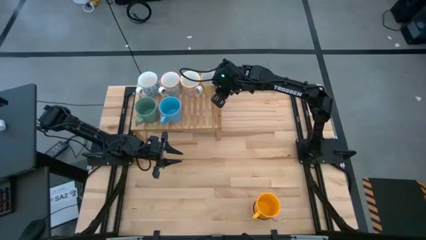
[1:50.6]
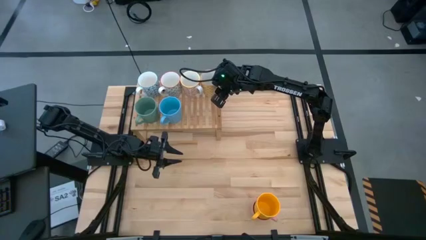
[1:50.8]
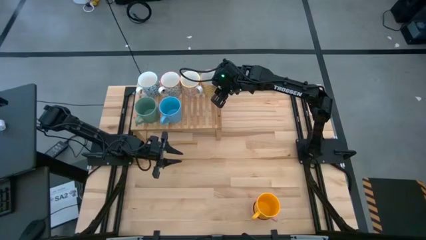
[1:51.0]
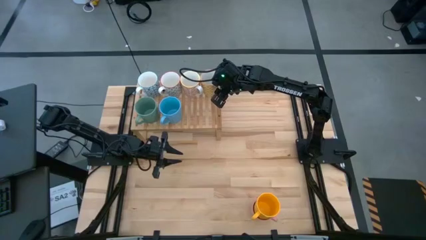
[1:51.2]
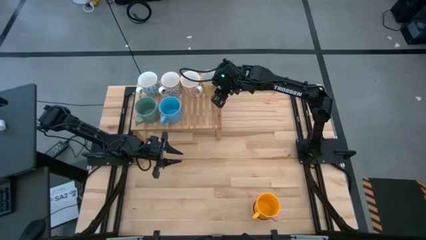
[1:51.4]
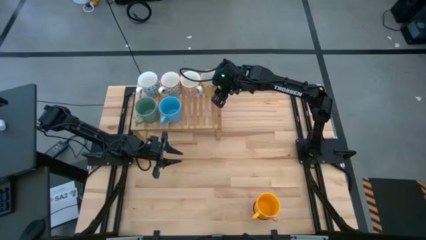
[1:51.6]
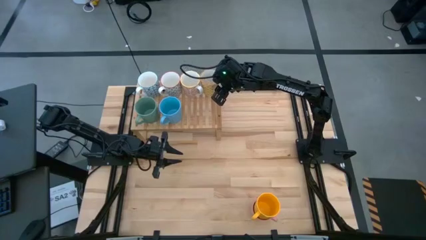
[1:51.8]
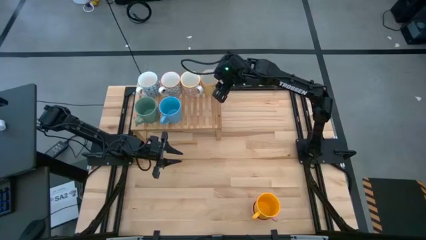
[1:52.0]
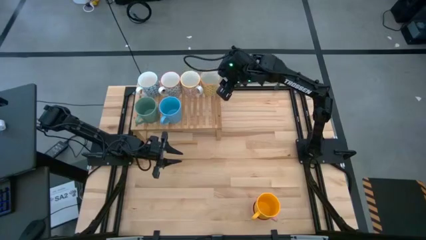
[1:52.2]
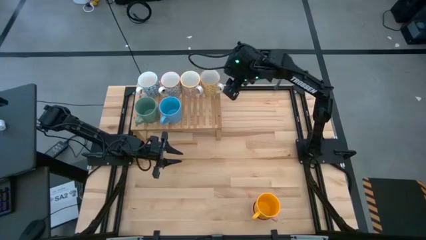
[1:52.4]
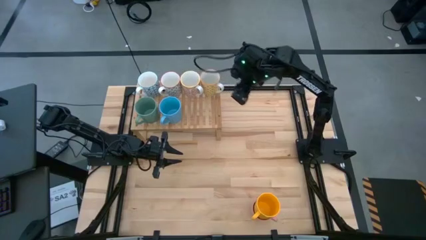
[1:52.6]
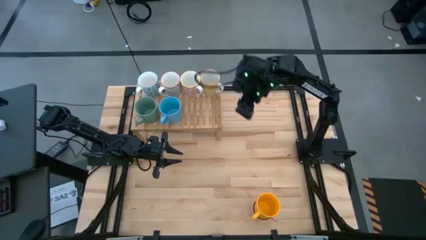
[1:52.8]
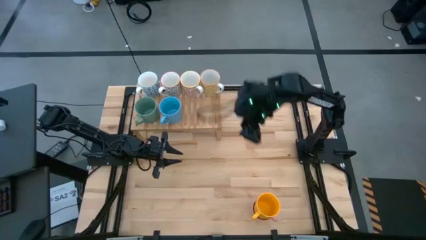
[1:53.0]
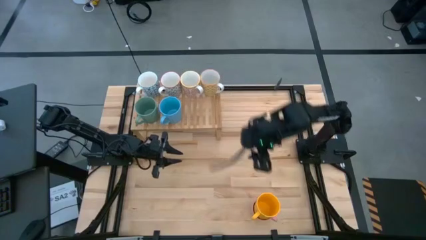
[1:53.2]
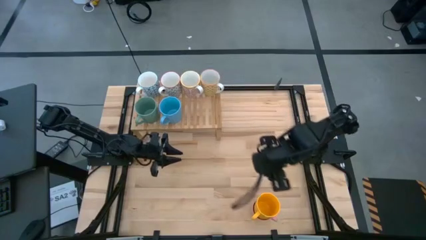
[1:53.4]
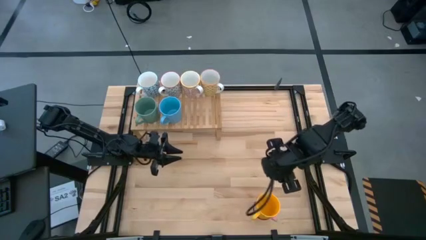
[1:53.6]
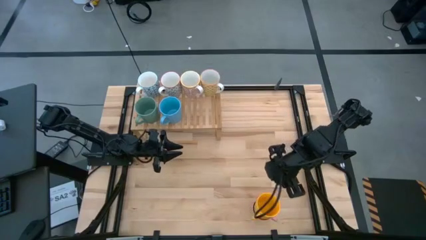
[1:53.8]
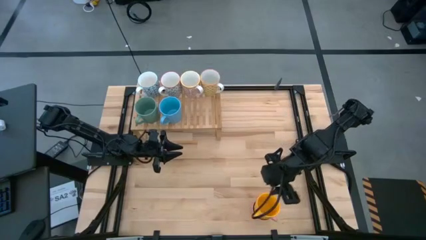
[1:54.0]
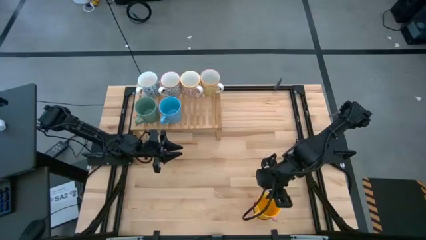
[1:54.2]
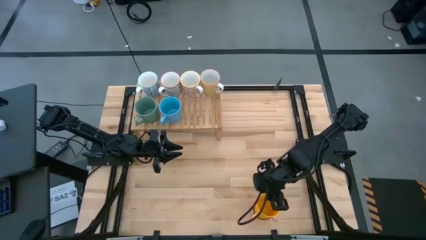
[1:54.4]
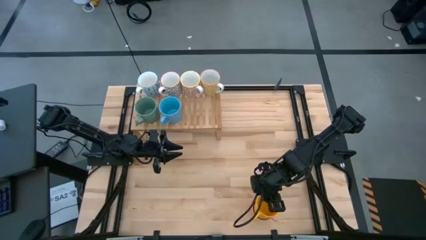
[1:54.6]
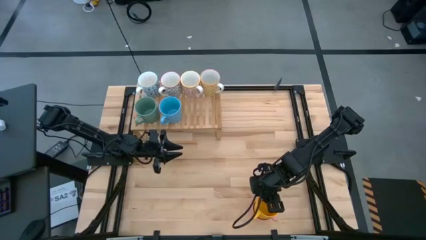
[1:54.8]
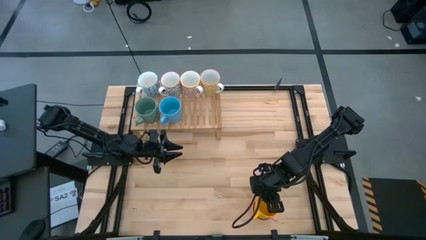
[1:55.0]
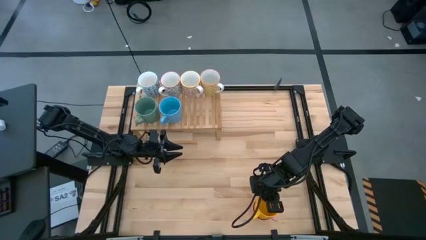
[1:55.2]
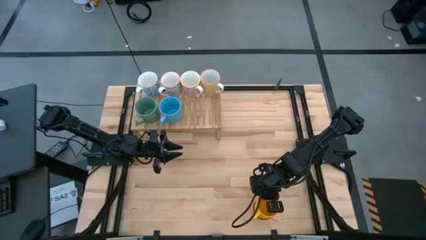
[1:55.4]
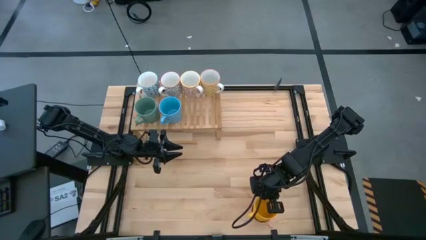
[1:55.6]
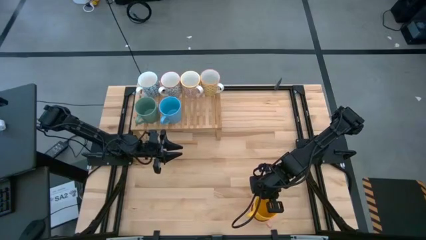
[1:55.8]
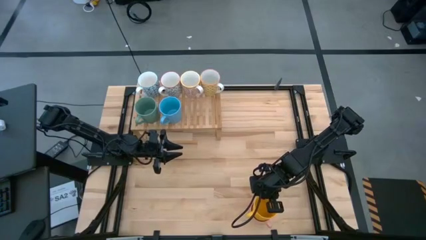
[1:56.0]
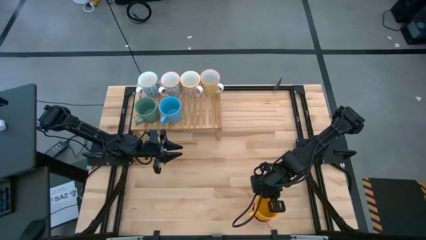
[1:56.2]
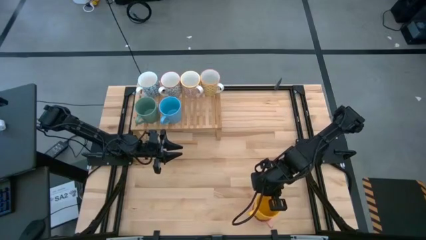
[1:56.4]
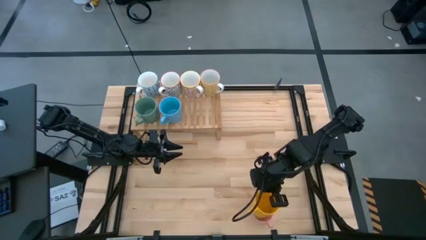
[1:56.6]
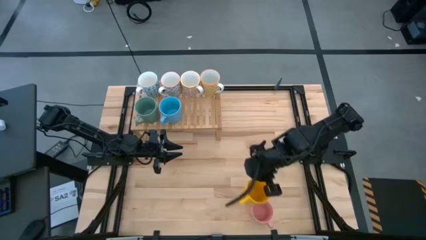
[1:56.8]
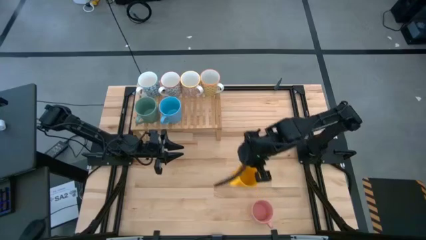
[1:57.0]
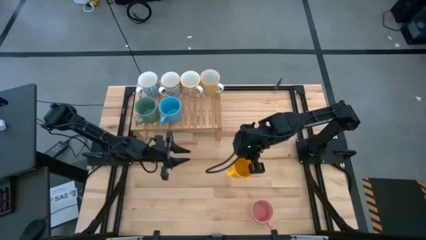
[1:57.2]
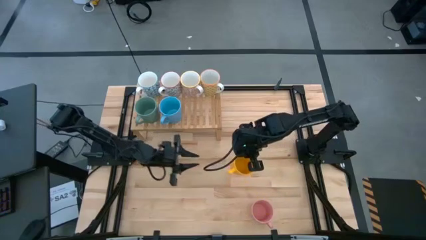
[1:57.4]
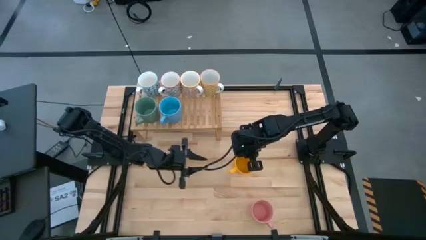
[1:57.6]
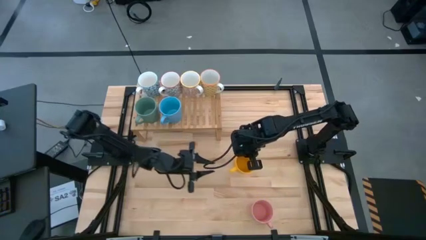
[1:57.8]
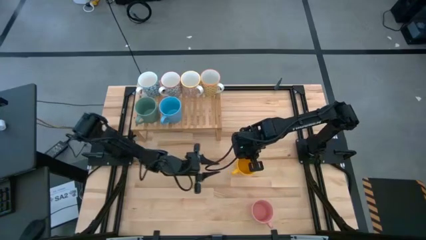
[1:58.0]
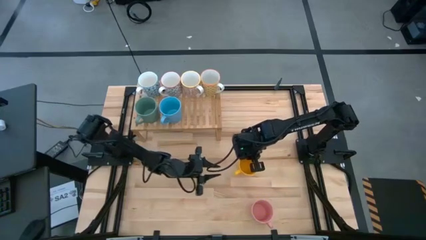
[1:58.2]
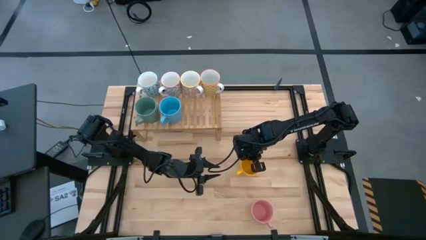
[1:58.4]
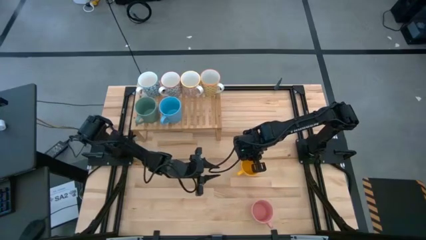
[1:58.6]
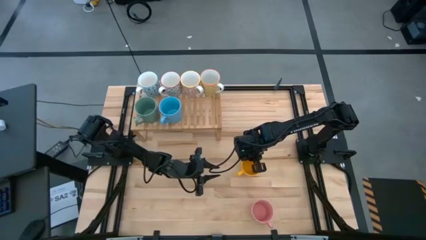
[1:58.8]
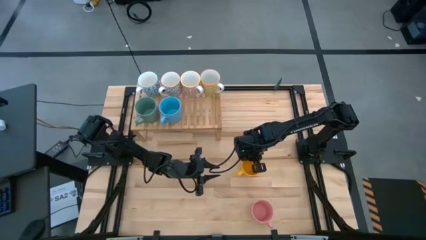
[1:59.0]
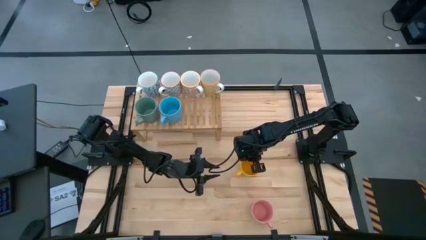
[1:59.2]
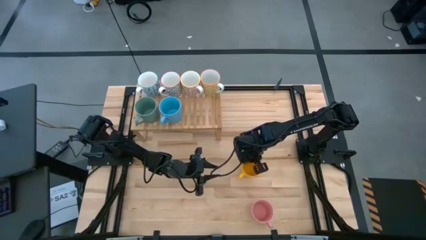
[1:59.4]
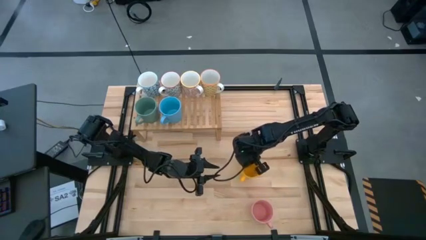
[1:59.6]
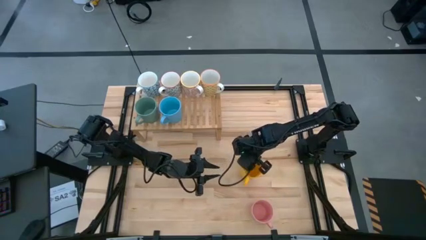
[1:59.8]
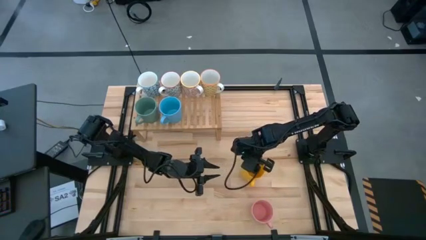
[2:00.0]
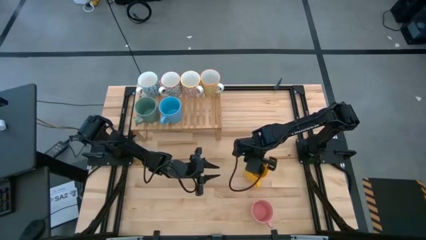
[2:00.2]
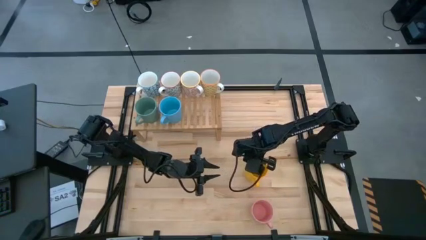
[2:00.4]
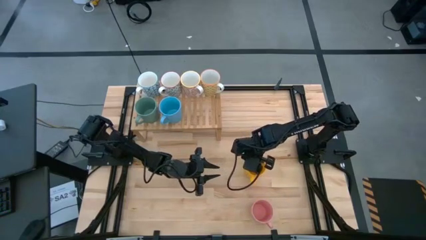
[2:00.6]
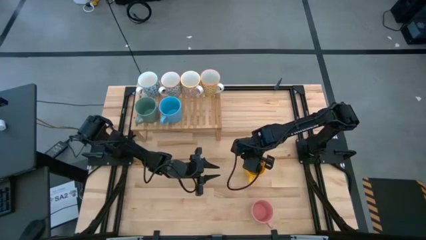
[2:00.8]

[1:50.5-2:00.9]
Task: Place coffee mugs
Put the yellow mug on the table

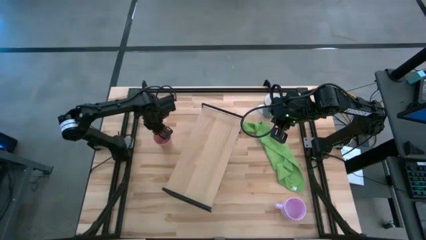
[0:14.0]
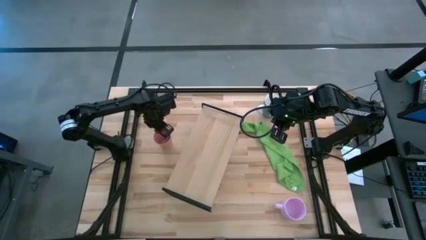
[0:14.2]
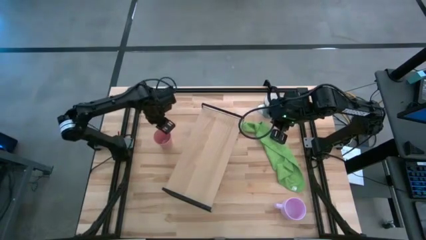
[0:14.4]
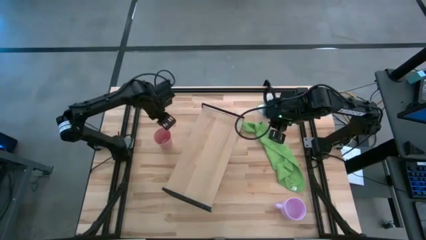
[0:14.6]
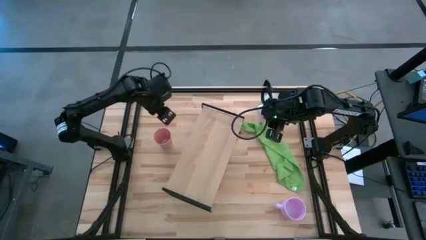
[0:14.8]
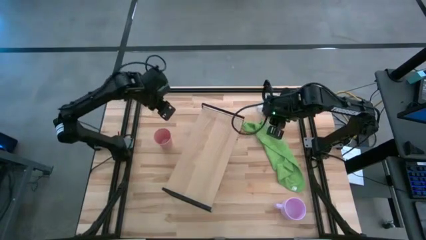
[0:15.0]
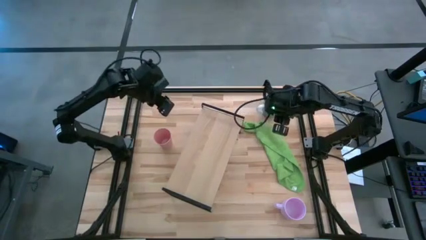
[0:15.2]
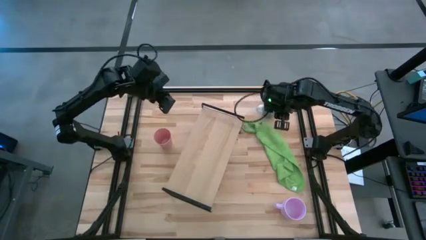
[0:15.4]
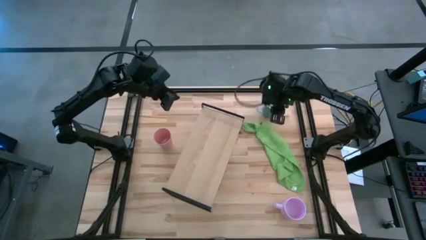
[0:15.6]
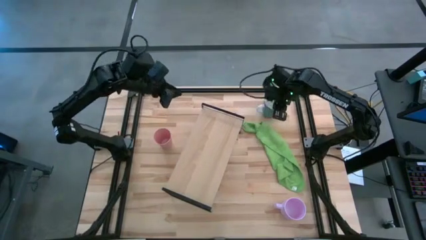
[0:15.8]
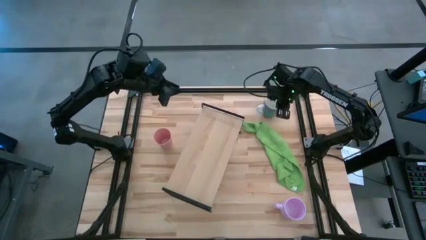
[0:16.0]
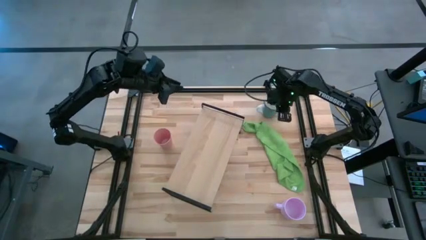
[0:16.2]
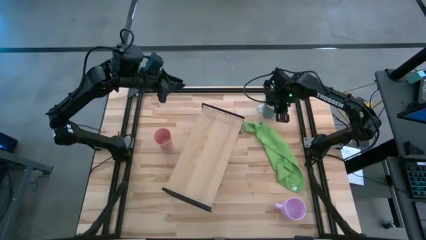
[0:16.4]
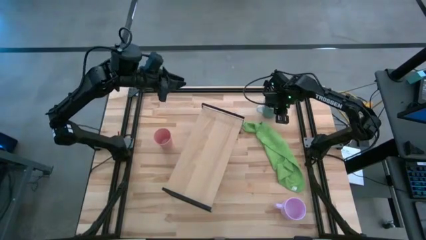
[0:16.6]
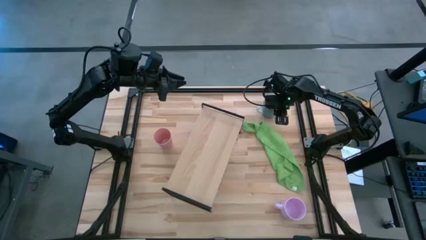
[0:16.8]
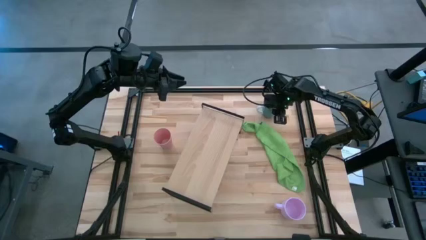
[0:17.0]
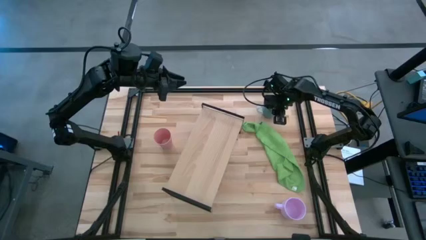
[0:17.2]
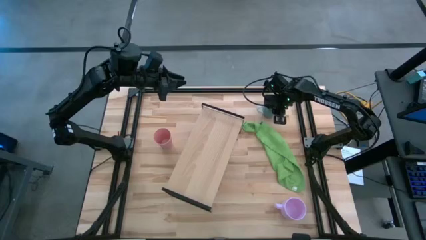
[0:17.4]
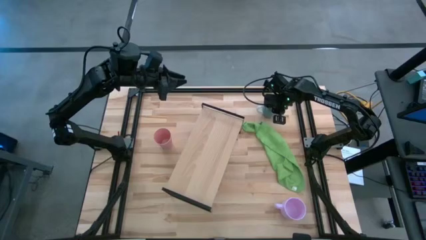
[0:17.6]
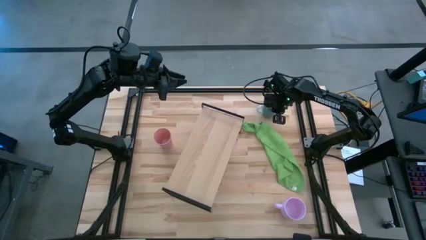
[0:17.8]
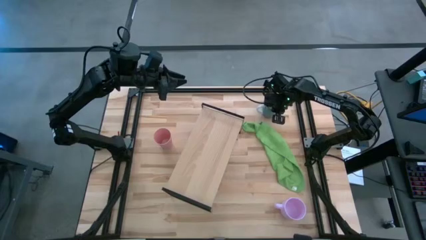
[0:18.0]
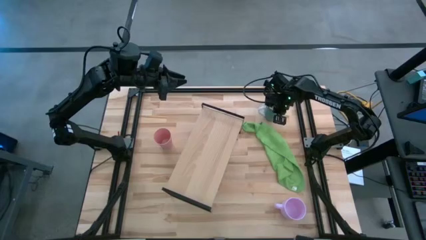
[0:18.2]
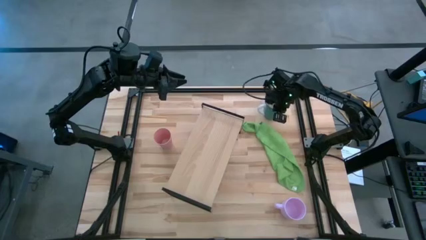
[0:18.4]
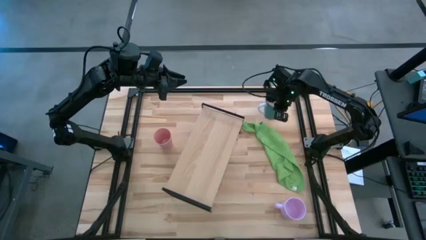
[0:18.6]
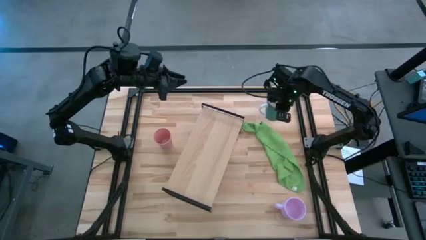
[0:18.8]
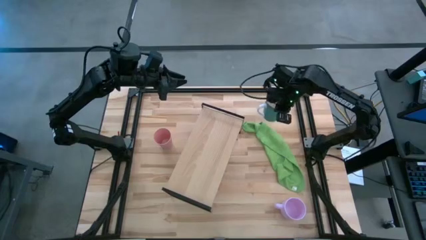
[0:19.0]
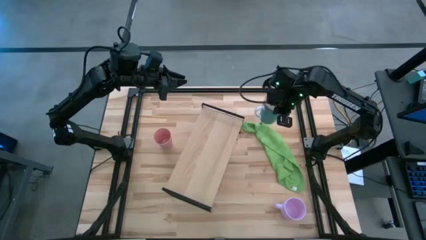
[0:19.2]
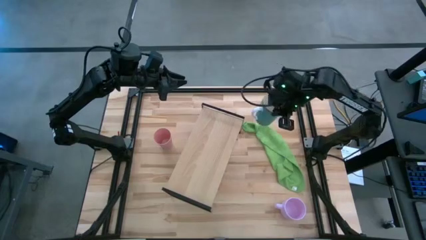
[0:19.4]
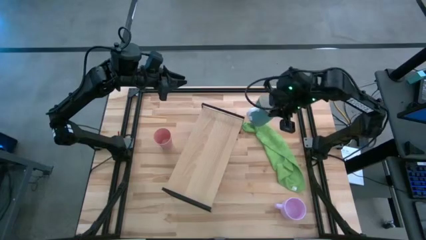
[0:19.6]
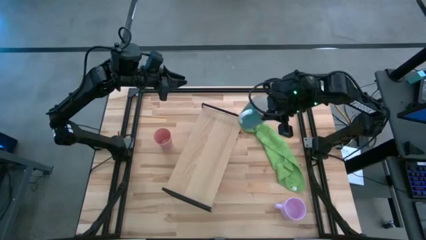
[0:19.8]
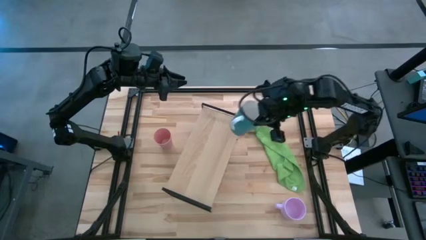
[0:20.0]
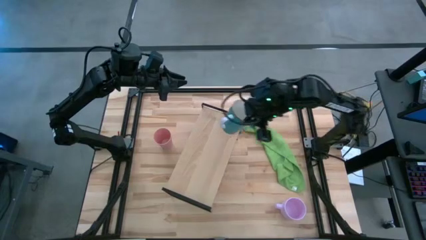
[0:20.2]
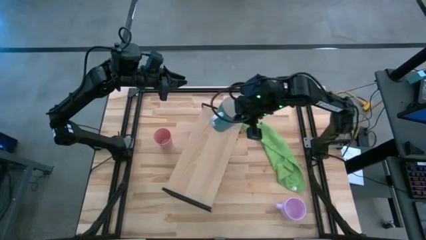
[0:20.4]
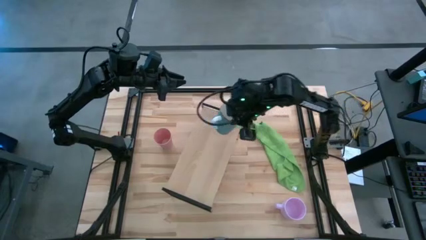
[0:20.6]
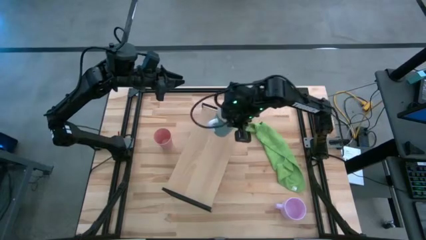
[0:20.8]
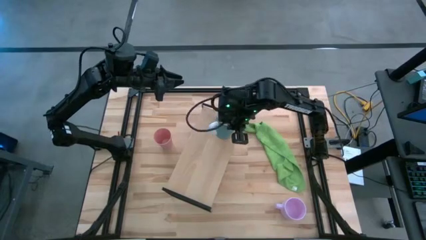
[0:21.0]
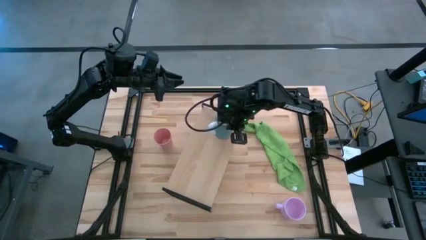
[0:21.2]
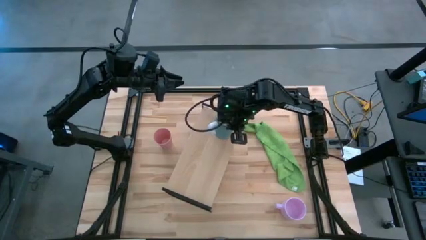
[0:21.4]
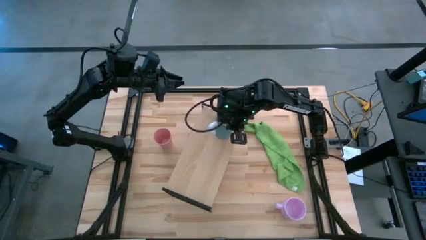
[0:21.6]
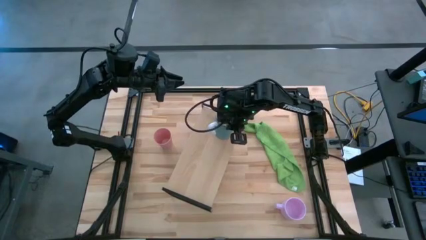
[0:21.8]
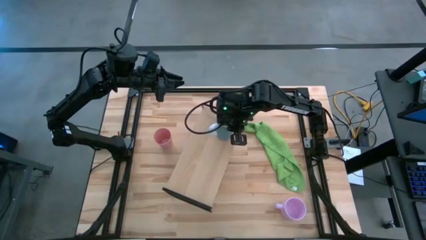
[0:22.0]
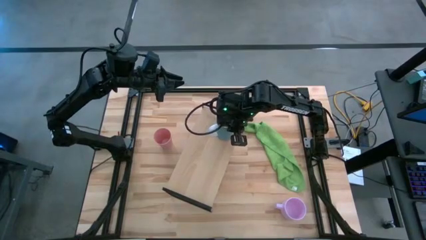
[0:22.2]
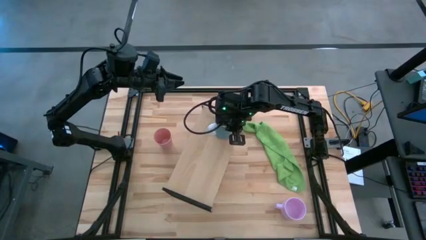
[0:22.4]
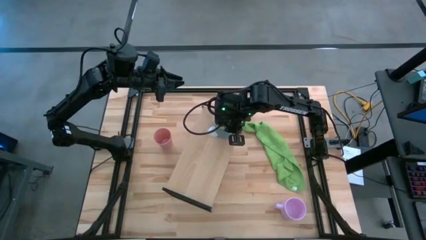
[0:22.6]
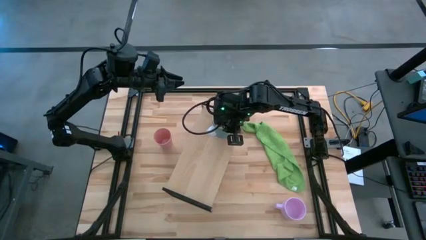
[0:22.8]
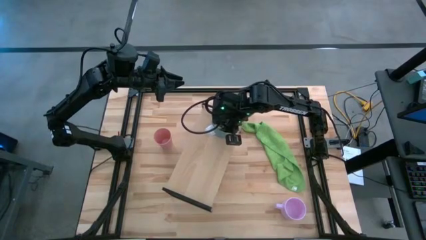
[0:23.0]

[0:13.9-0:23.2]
Task: Stack small to large cups/mugs on shelf
Put the light blue mug on the shelf
